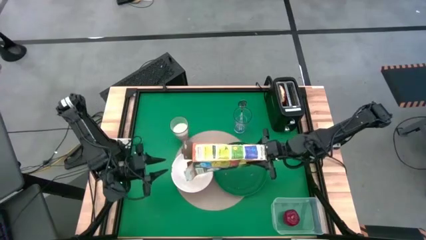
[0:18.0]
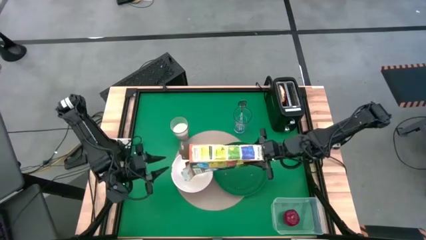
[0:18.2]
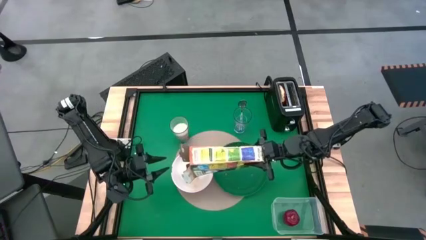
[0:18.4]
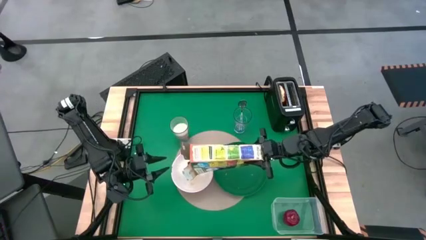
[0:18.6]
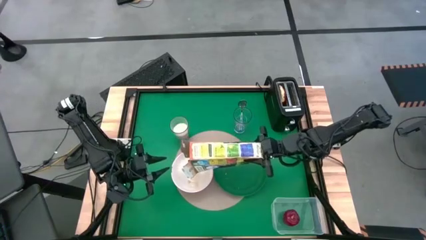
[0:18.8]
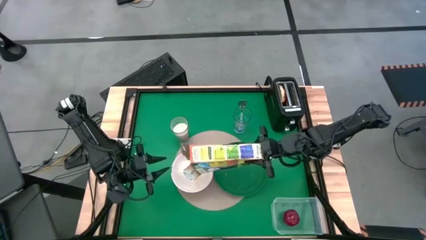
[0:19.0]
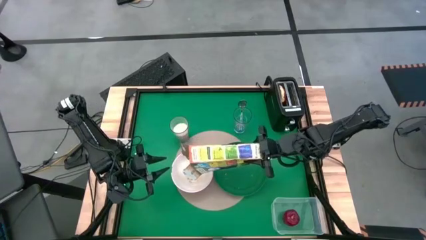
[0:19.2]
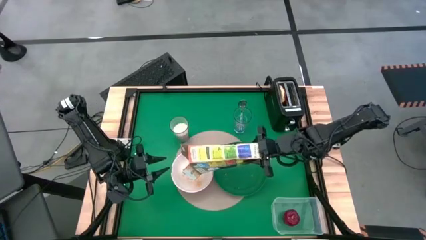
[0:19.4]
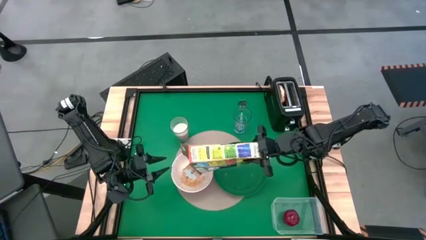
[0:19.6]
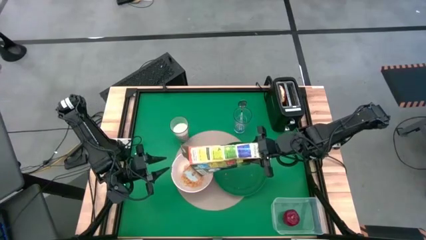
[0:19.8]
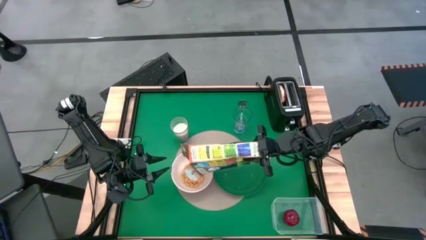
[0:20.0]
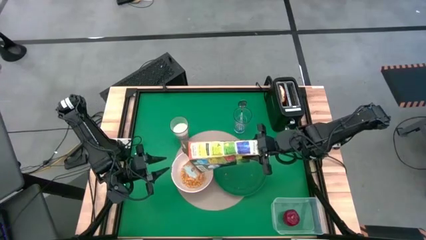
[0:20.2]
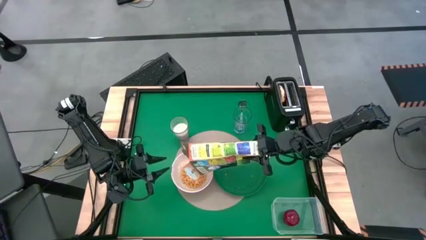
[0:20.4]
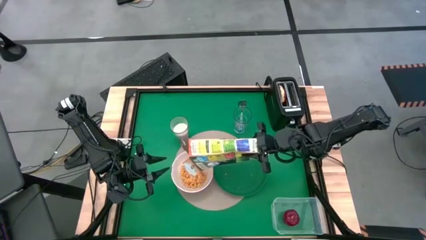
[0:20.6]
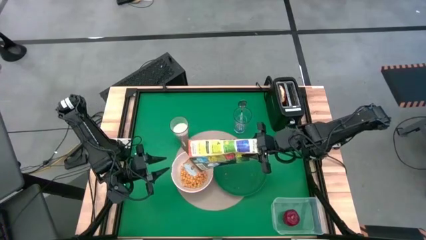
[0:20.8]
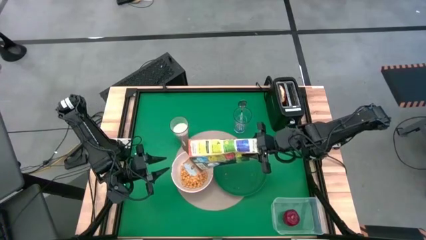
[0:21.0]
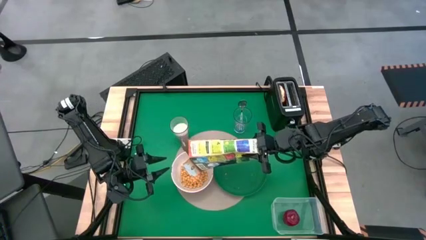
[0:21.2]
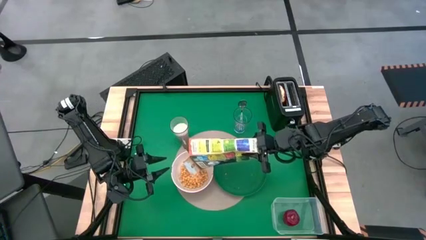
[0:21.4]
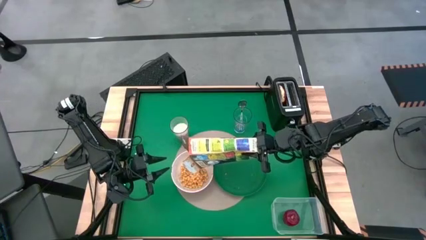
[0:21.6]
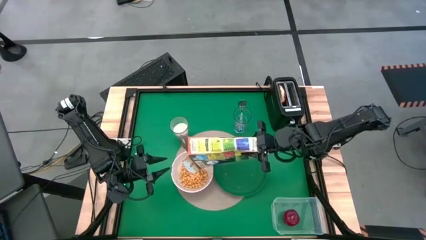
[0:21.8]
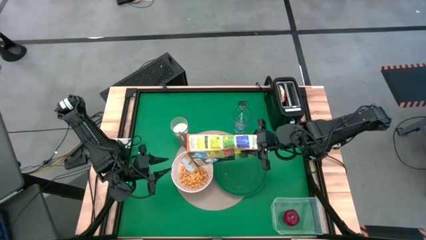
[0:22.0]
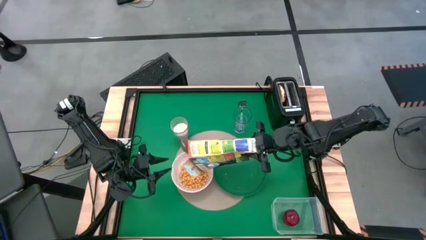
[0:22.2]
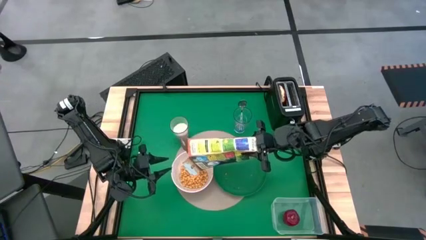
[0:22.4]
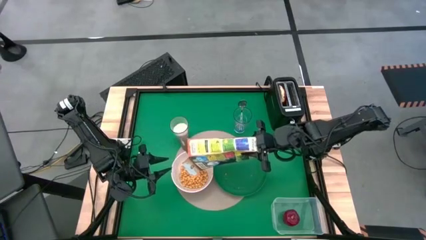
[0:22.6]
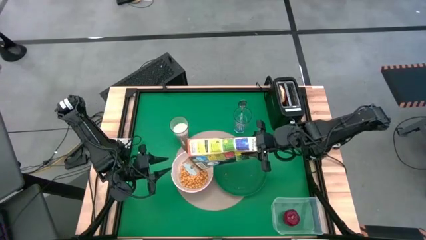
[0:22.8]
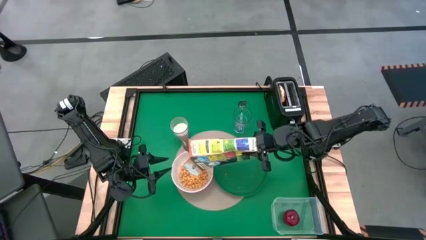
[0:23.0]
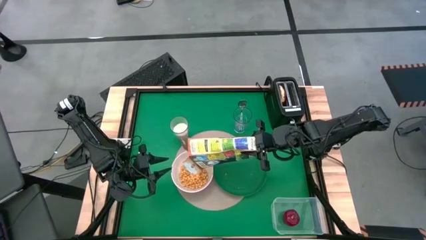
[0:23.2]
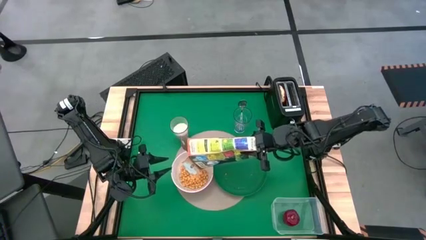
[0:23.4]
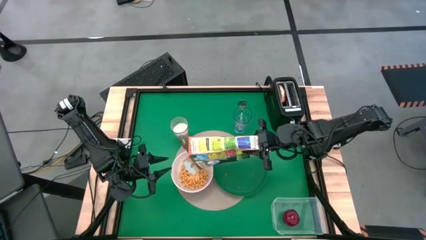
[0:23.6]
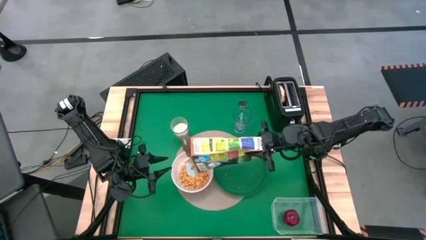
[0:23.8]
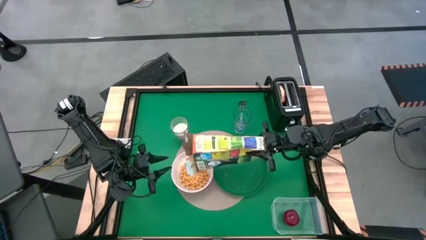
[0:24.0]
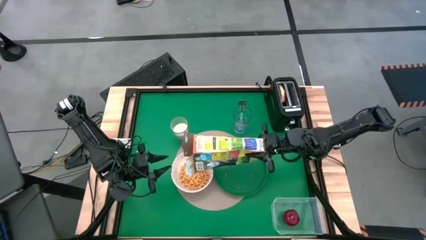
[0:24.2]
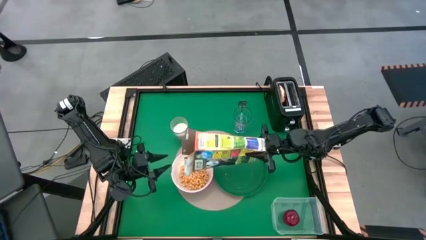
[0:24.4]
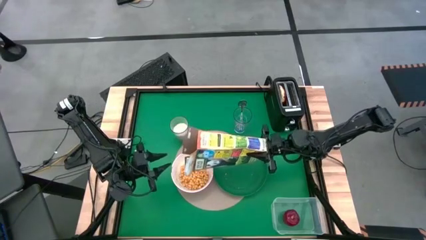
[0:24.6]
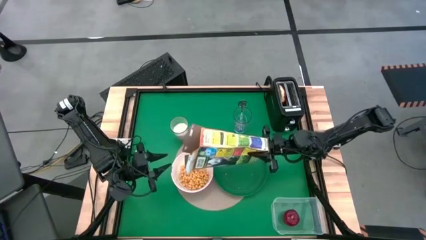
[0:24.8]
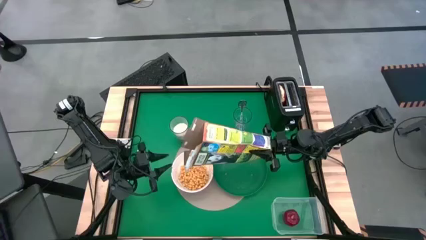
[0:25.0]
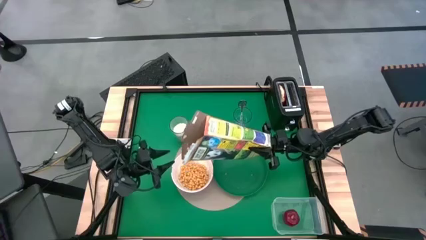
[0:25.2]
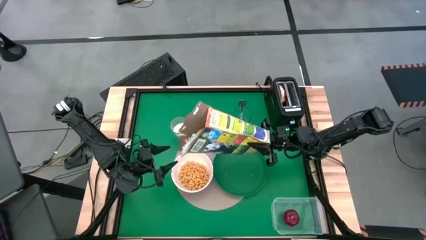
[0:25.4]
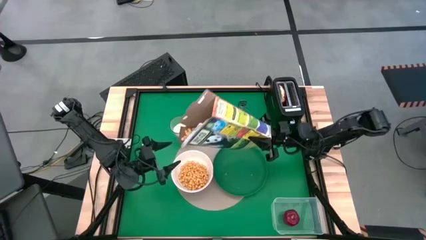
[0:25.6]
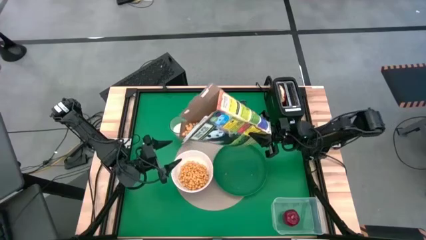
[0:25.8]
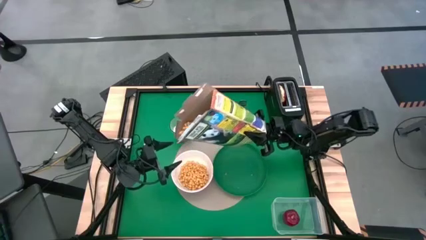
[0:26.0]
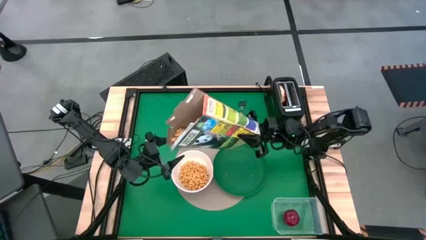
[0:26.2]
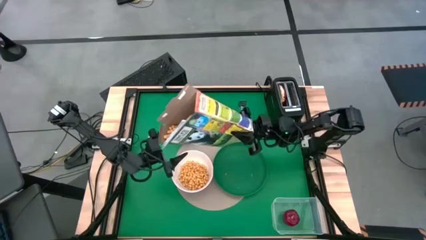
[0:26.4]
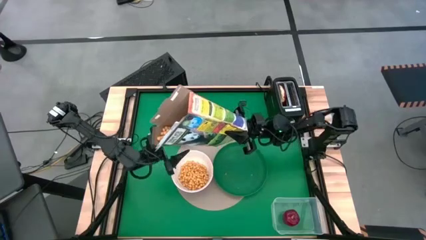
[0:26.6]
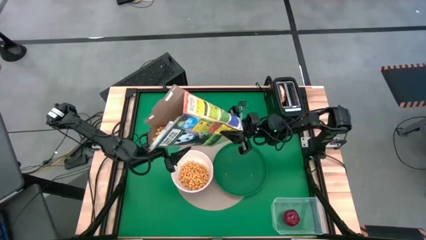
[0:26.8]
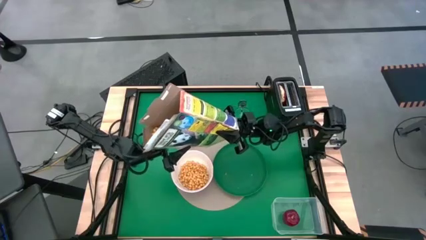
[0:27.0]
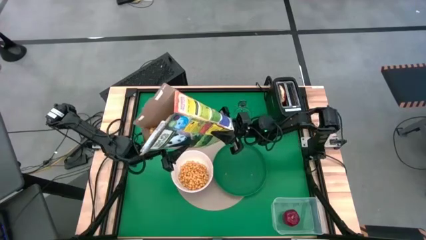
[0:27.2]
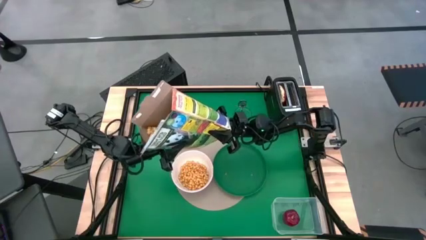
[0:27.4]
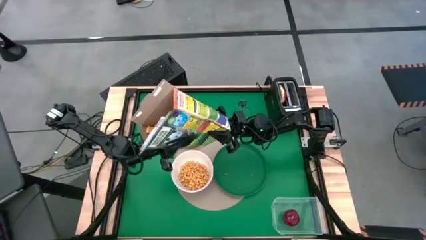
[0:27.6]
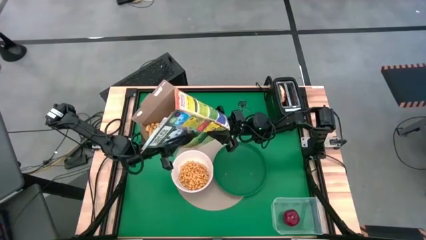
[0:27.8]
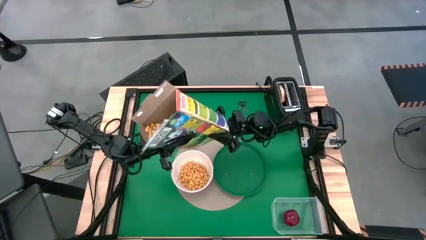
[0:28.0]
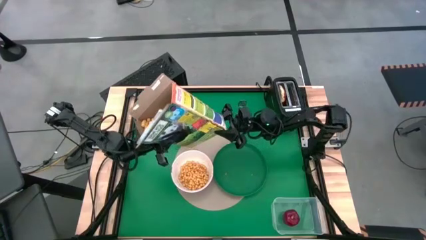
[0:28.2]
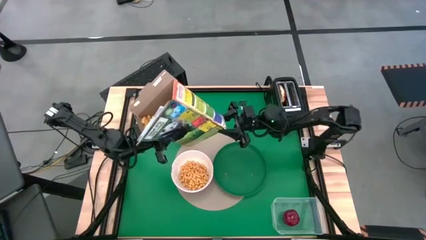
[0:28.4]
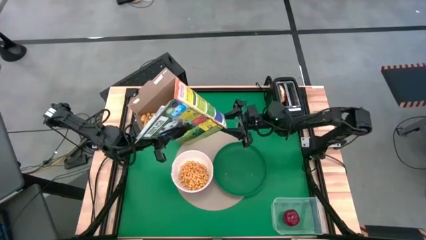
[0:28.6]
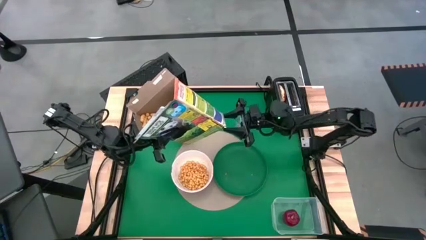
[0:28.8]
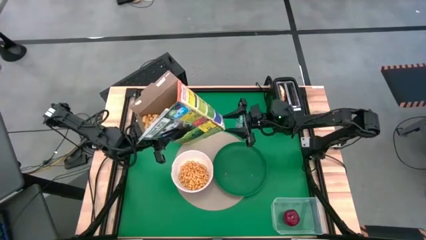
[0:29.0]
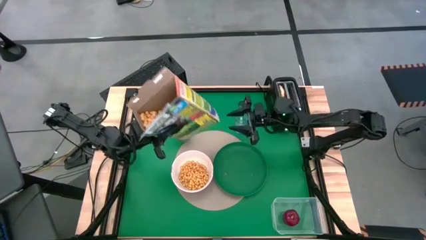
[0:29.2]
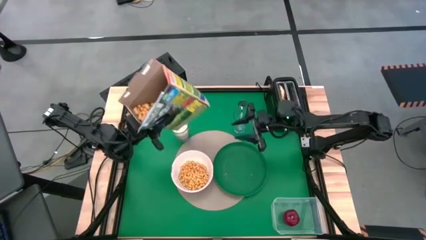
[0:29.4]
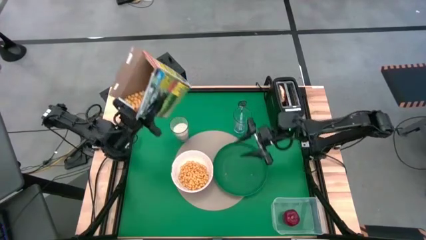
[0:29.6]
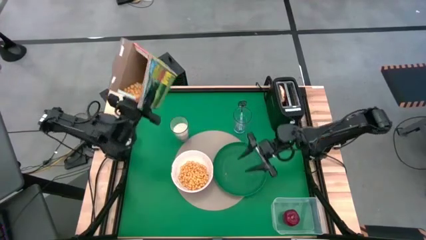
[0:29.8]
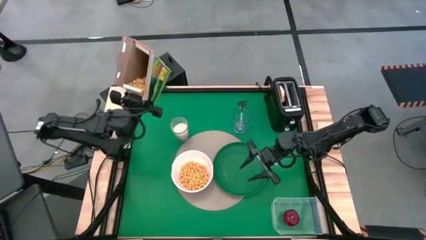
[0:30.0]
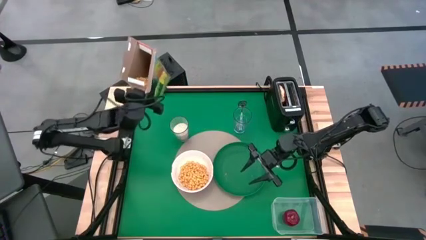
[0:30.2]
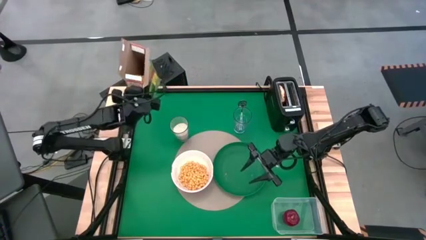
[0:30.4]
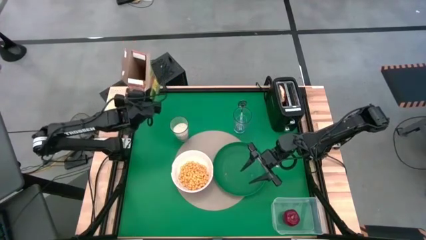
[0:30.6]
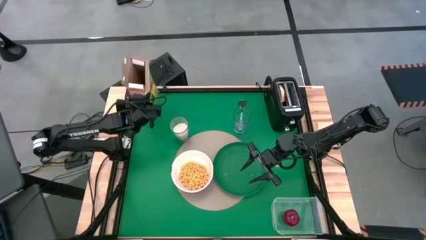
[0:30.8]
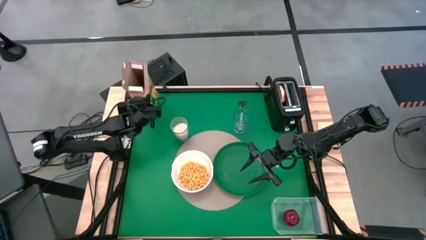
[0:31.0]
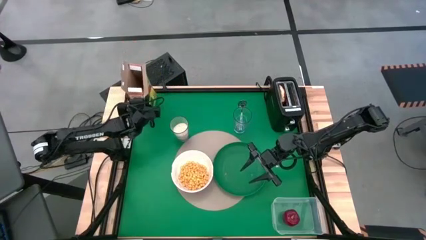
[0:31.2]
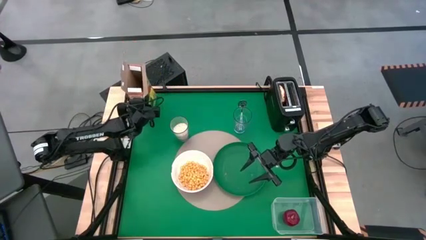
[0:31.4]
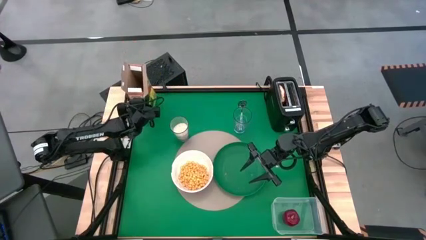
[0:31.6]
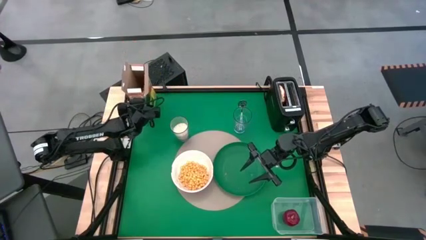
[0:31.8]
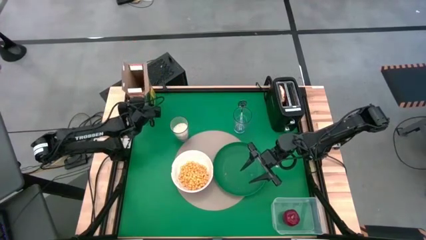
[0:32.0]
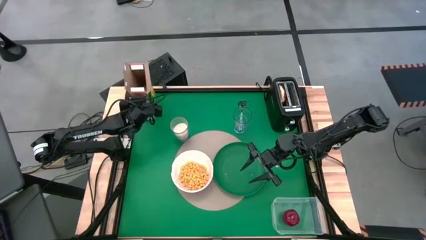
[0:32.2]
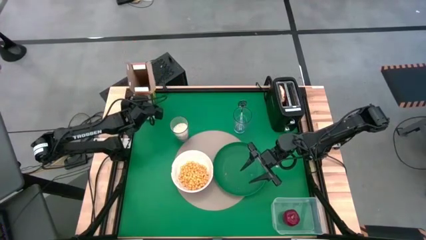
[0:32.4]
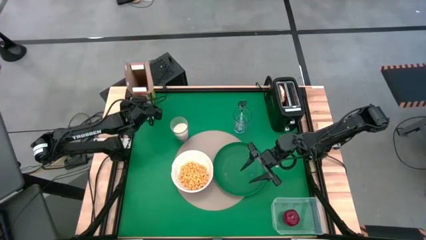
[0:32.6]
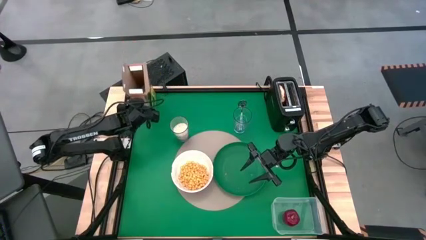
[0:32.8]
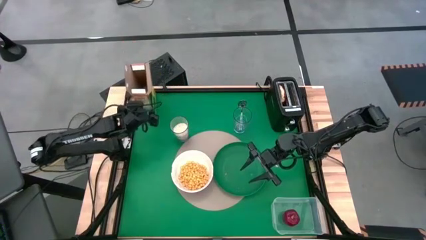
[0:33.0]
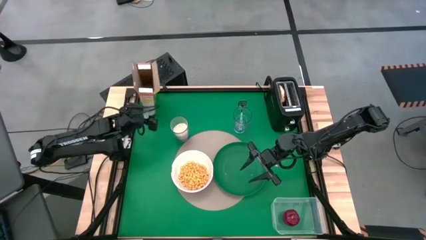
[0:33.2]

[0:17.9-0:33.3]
Task: Arrange a breakfast setting
Pour the cereal into the white bowl
